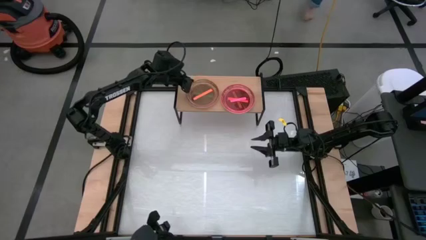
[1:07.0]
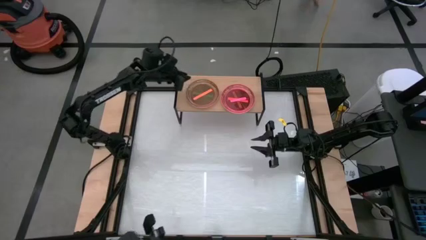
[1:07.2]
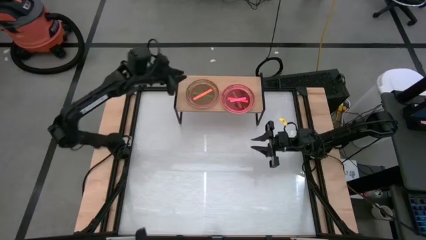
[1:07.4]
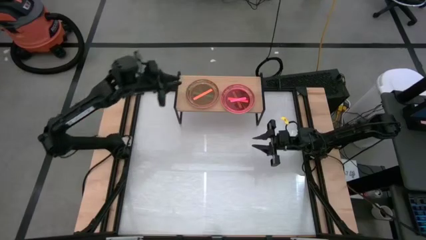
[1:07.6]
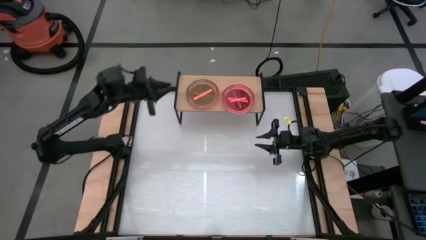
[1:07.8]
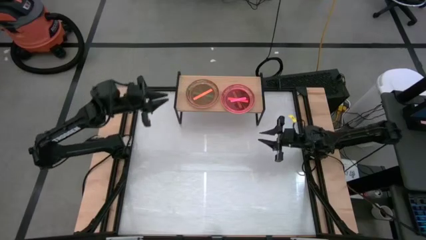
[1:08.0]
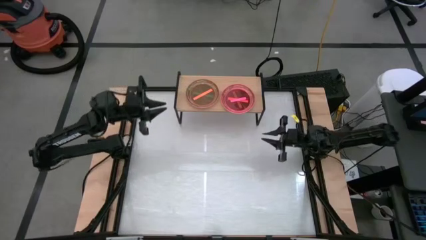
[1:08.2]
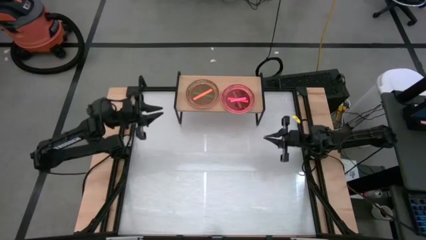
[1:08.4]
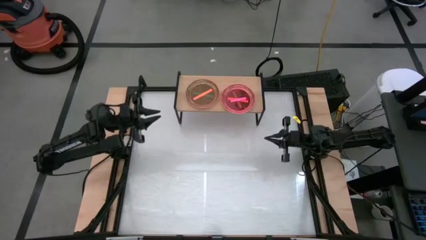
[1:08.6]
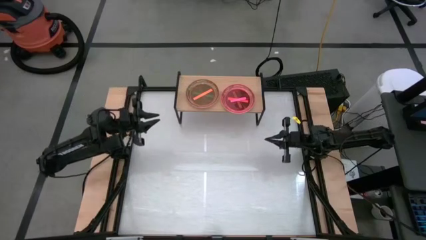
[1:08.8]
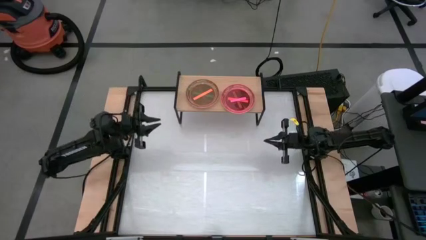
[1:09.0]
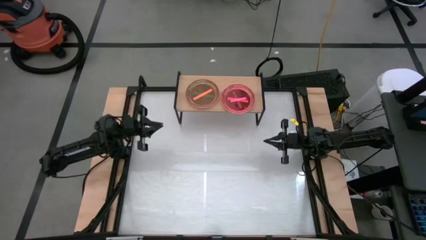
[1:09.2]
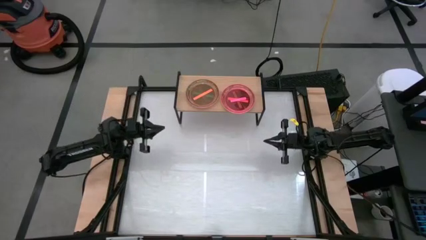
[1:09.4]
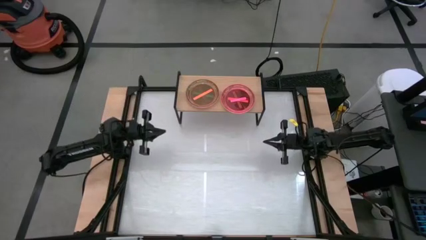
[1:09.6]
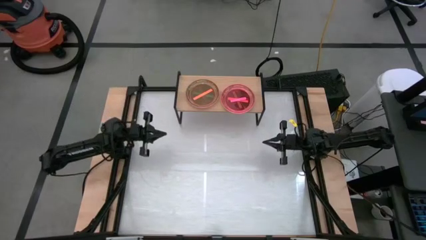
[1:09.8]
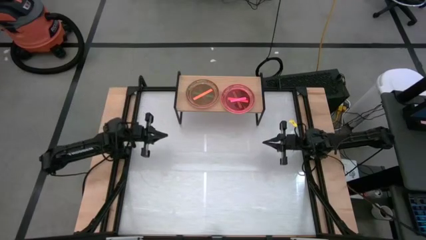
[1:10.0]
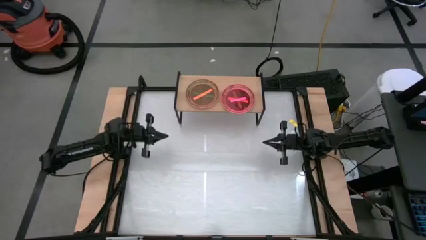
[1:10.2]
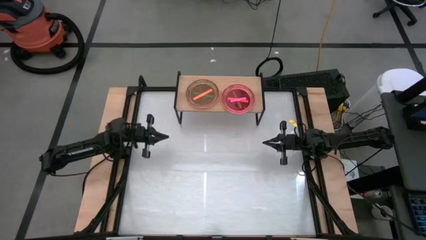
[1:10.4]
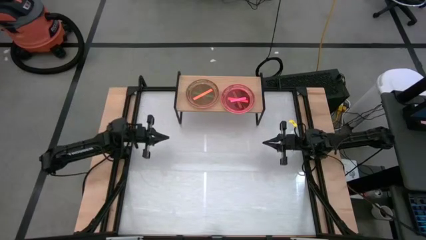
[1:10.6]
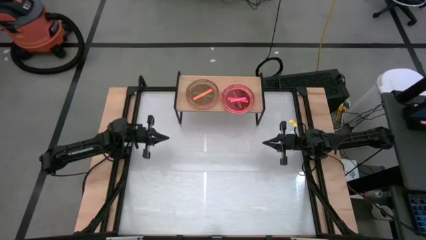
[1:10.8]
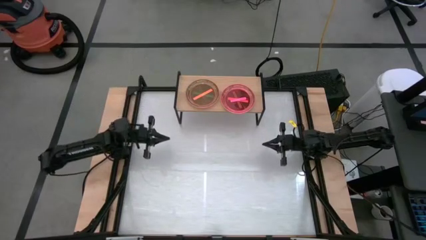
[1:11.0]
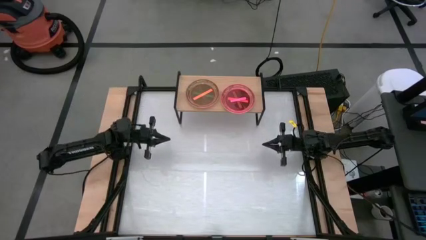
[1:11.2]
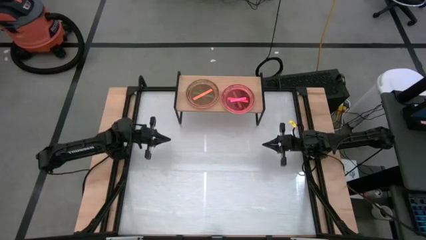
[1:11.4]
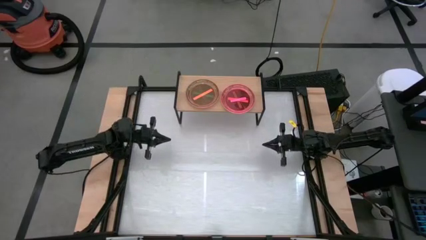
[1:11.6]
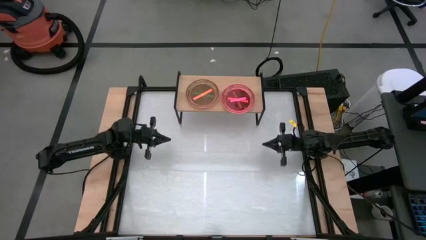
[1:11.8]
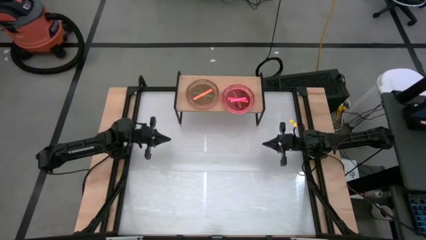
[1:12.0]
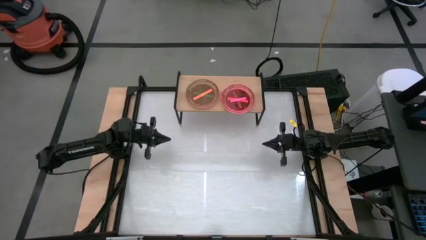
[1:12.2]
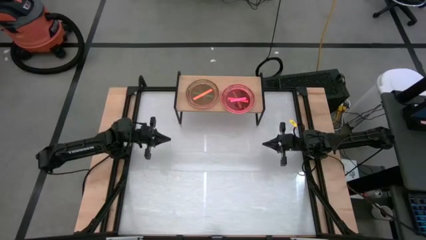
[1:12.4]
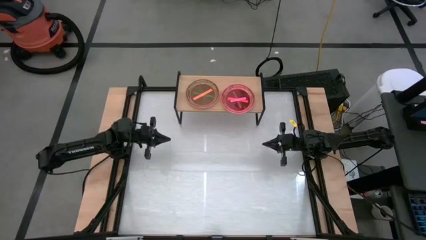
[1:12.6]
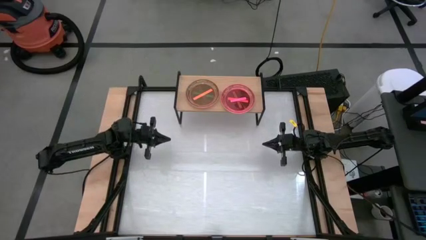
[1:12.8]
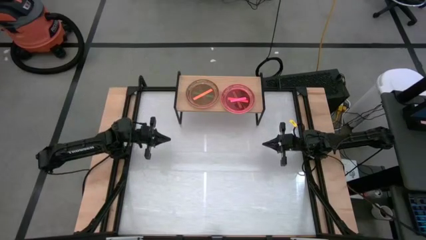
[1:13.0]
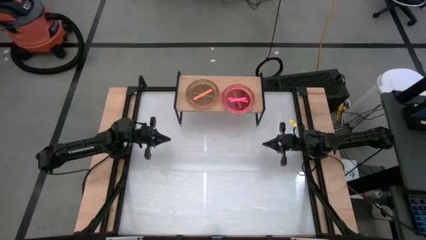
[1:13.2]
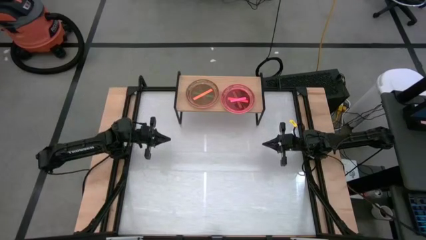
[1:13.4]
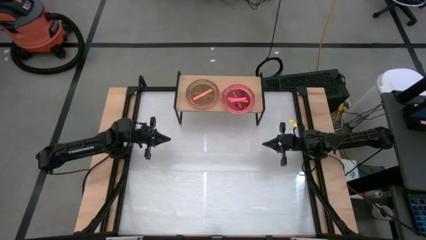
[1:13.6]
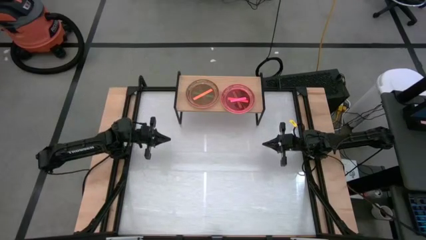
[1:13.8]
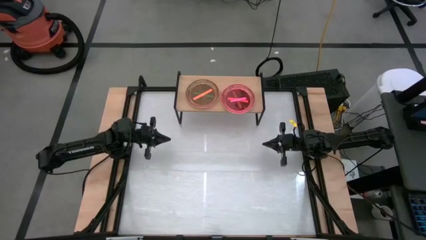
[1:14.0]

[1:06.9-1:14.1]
Task: Place and stack plates onto a shelf
Return to Home Position

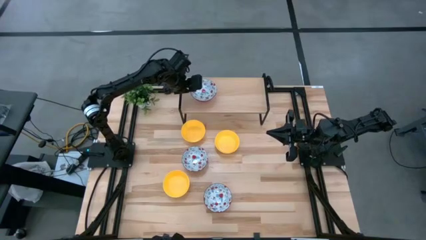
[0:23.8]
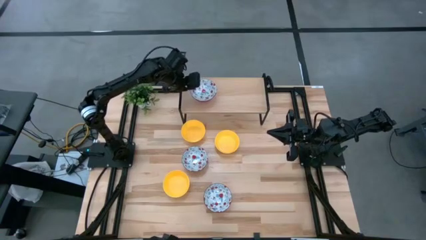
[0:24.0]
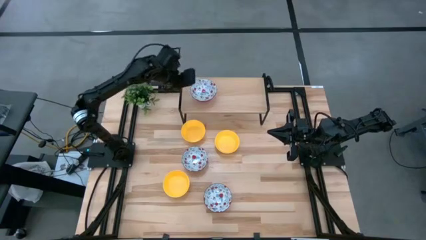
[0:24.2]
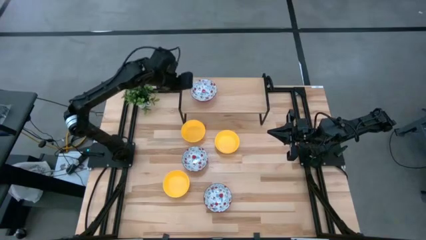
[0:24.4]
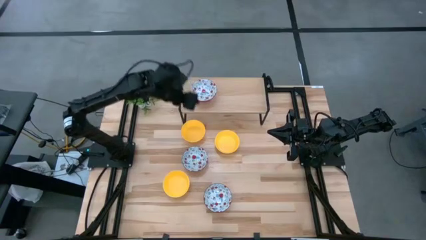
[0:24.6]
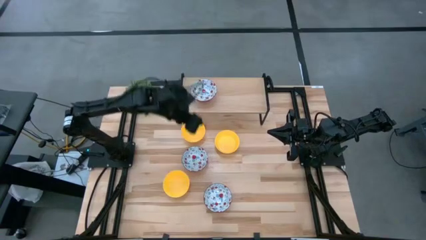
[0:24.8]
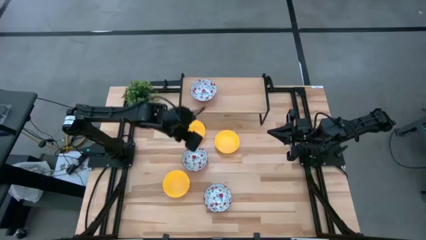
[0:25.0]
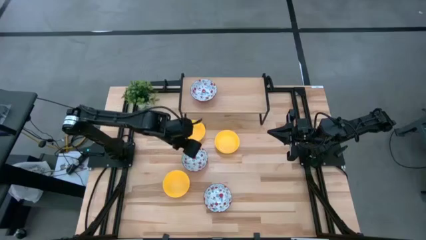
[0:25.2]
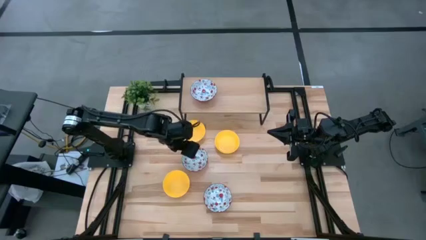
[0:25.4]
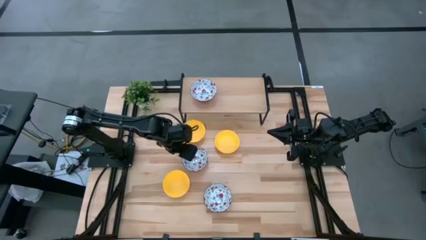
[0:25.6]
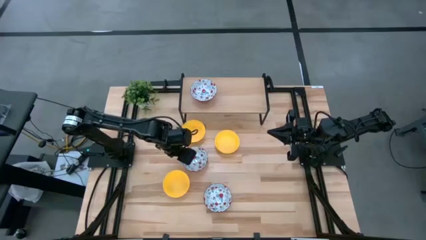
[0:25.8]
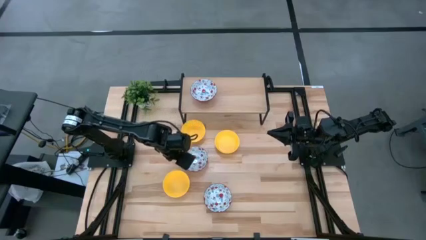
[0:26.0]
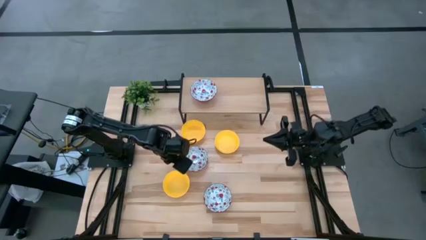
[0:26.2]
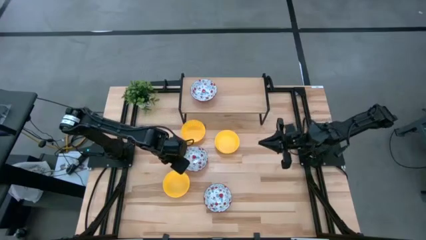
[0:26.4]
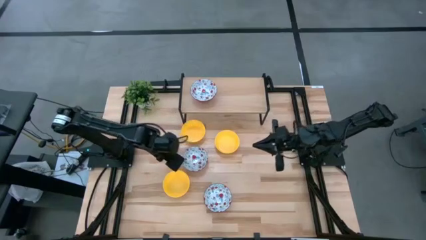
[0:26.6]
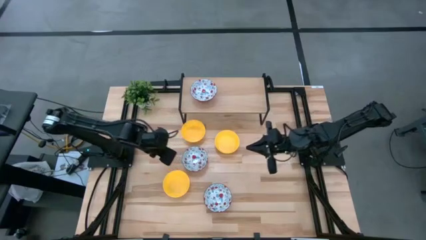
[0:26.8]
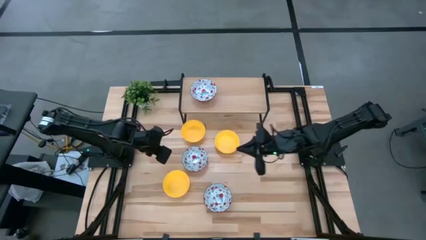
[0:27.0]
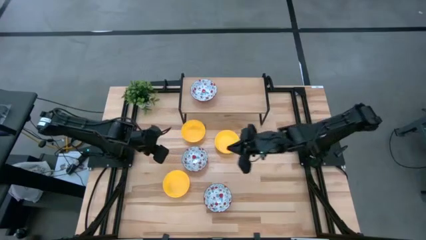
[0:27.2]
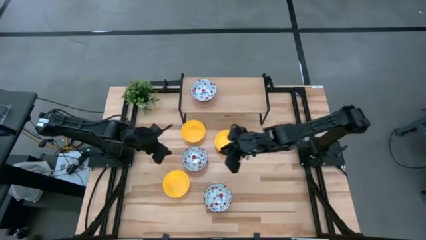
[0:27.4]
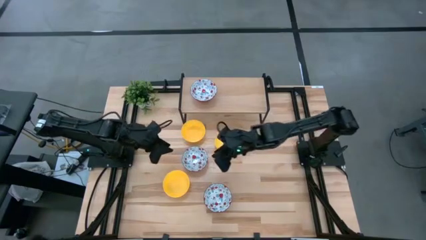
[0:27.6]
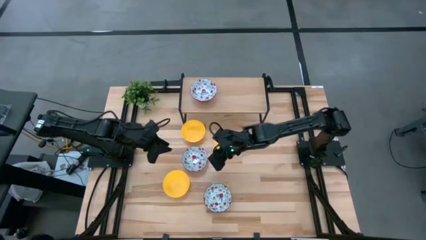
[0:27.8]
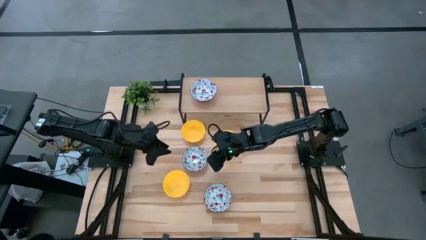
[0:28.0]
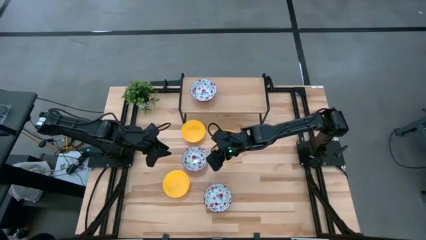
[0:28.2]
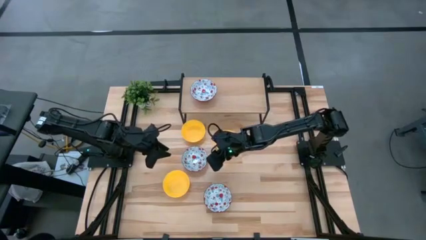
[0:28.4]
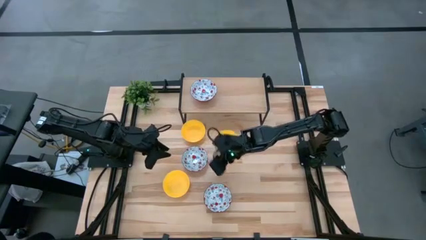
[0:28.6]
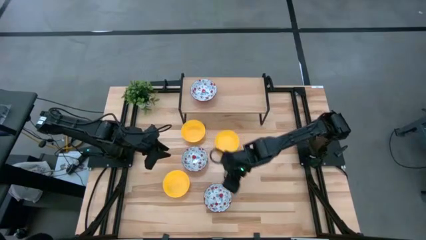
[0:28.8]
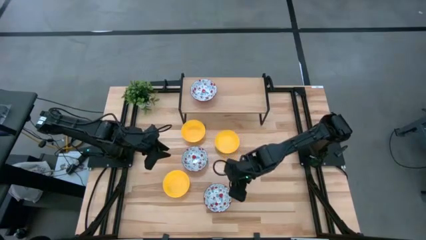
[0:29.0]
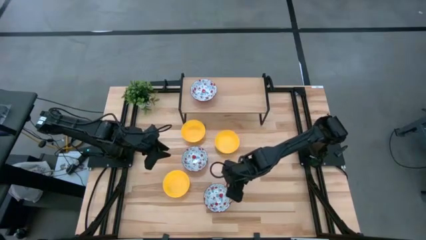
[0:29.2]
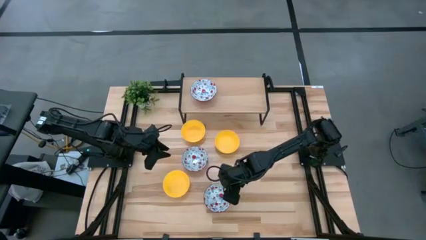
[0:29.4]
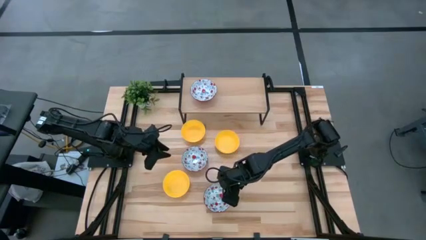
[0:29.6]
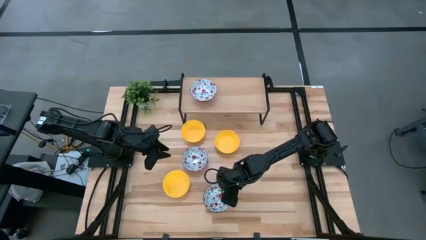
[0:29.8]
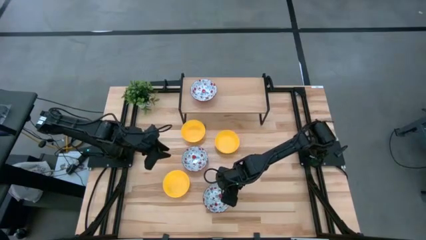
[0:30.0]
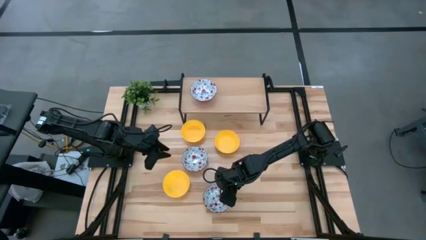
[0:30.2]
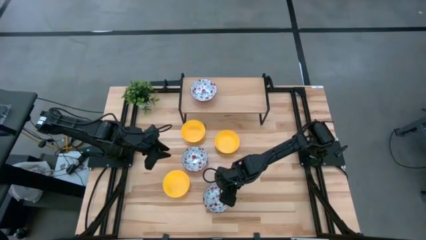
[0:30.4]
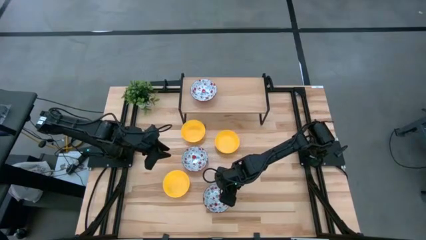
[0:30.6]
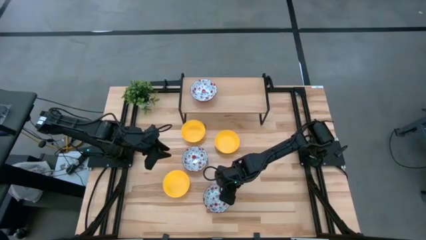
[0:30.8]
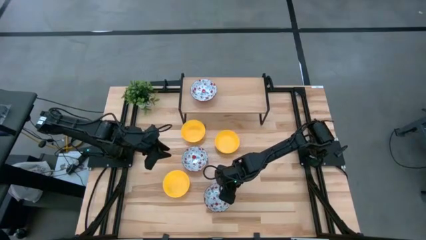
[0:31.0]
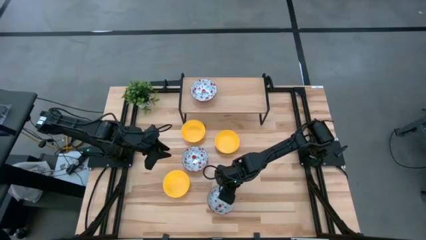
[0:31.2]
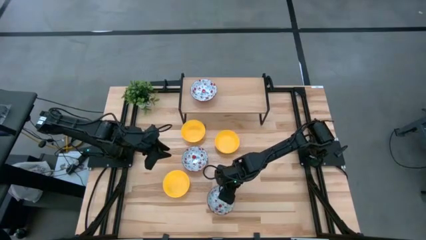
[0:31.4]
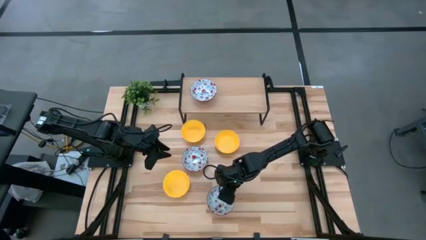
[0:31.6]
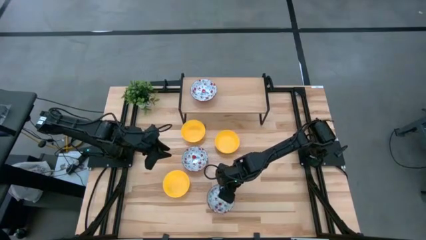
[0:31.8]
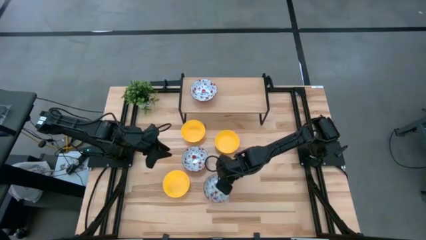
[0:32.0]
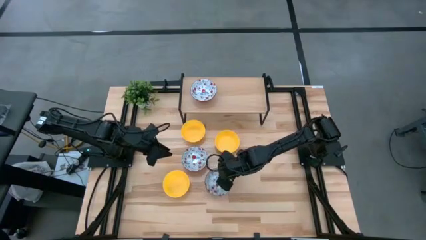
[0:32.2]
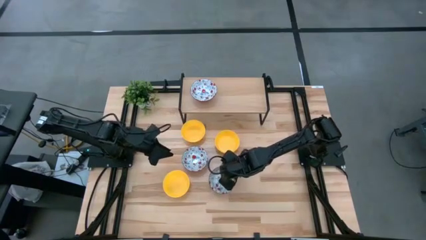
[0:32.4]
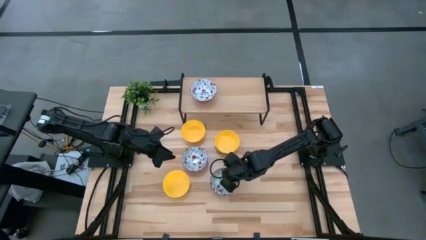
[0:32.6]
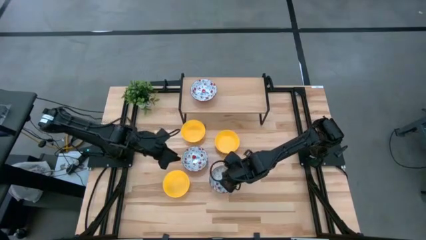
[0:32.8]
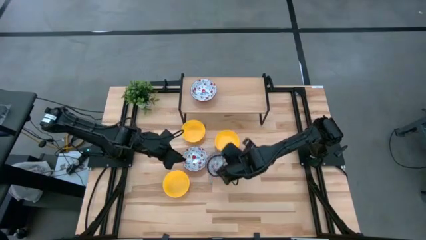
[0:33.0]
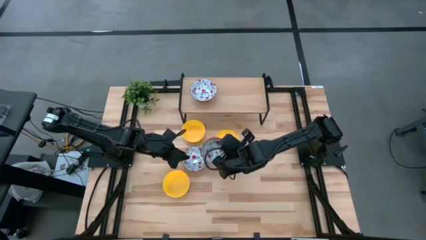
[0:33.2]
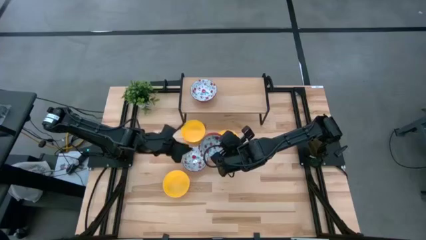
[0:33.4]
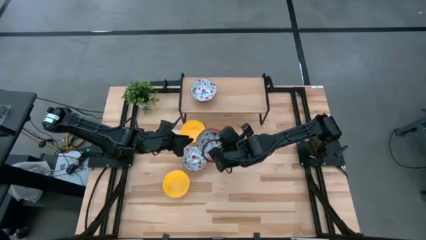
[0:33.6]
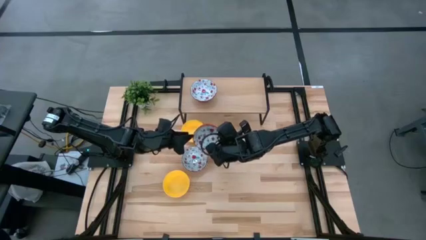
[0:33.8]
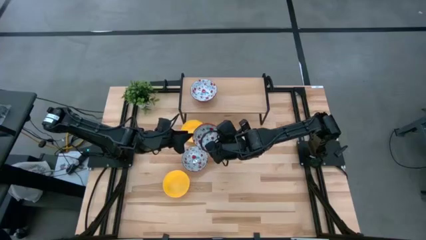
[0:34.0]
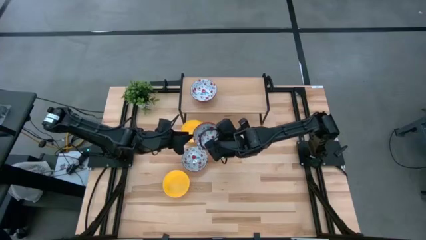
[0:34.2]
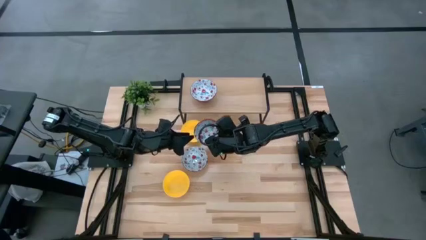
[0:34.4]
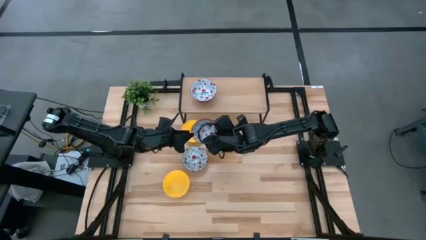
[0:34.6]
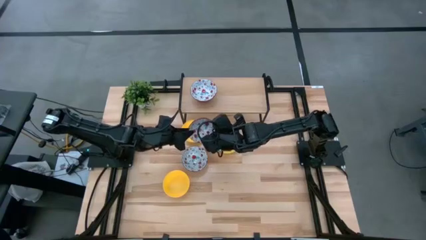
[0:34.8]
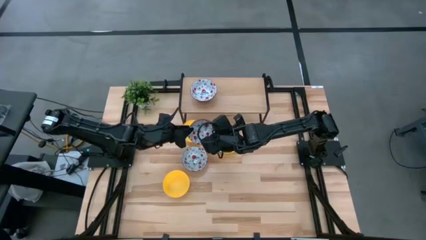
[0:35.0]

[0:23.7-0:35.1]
Task: Pick & Place Mini bowls
Stack the bottom white patterned bowl on top of the white patterned bowl on the shelf
